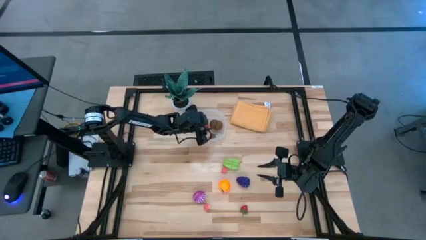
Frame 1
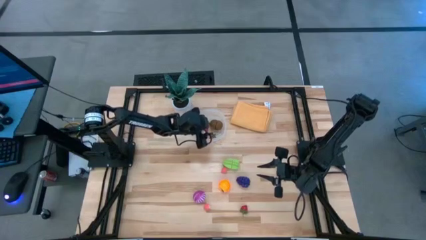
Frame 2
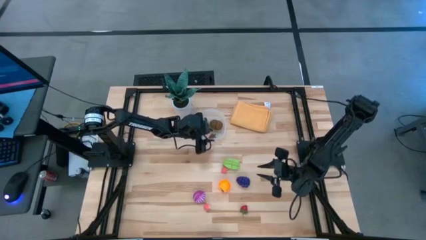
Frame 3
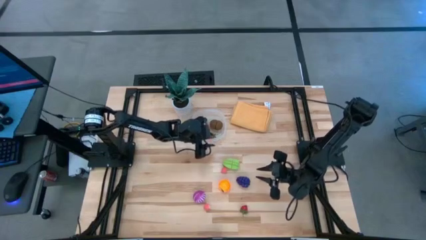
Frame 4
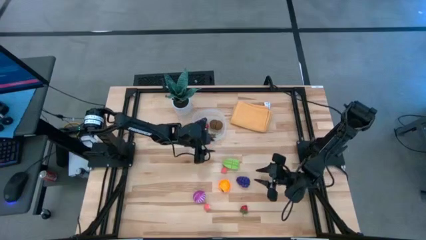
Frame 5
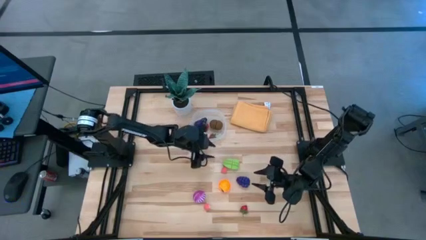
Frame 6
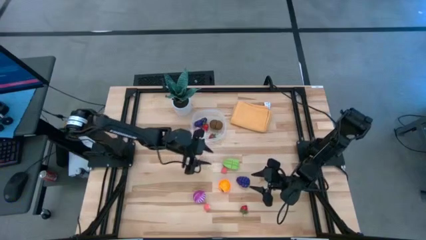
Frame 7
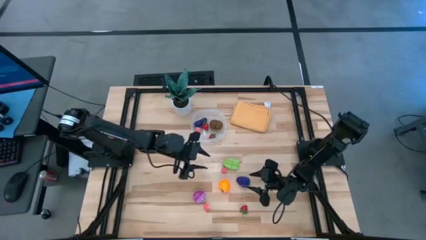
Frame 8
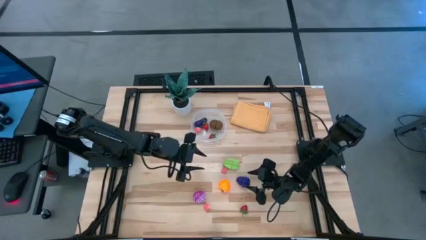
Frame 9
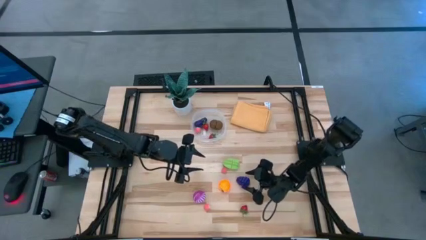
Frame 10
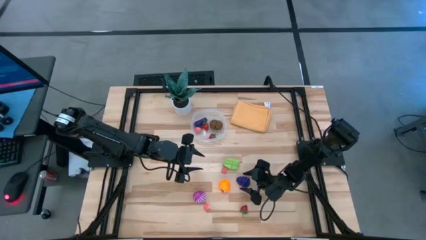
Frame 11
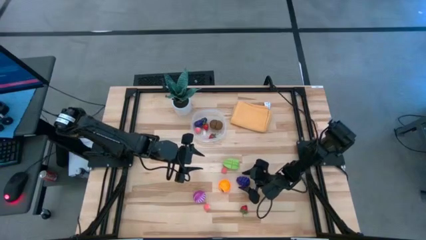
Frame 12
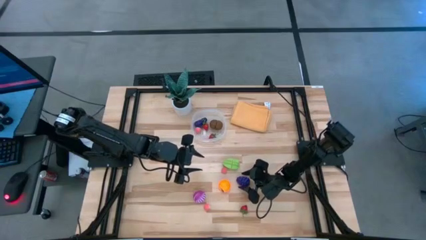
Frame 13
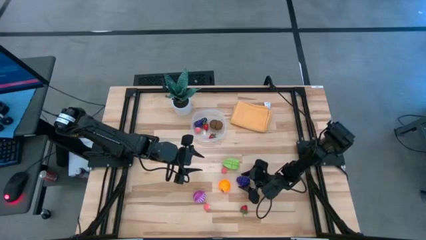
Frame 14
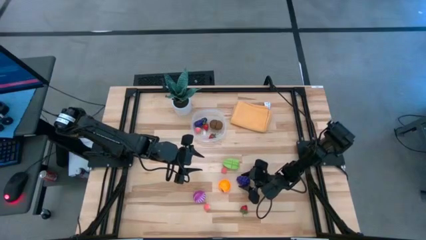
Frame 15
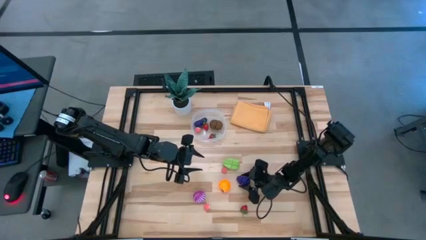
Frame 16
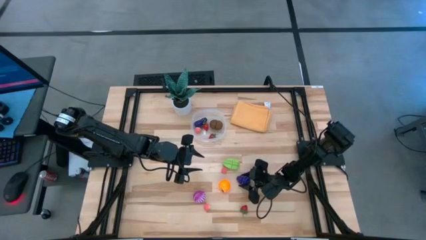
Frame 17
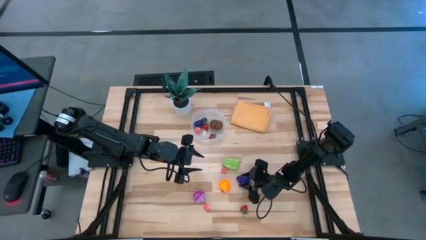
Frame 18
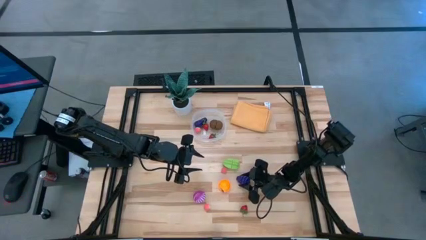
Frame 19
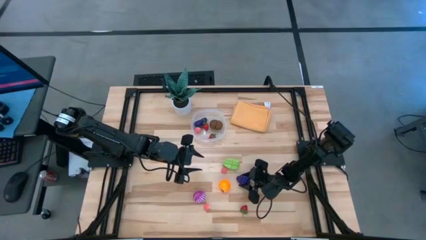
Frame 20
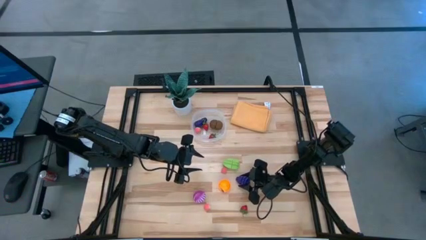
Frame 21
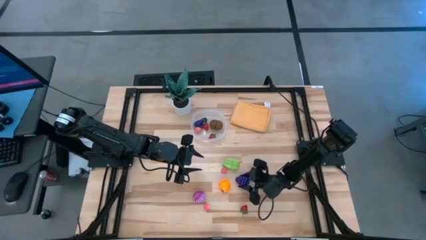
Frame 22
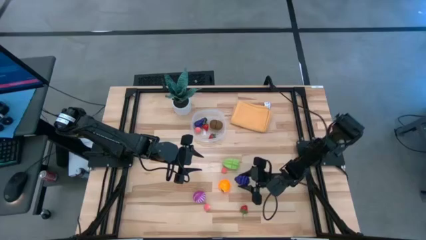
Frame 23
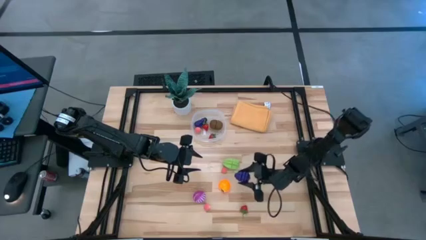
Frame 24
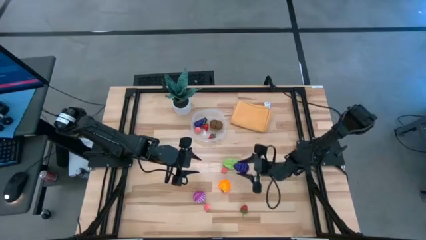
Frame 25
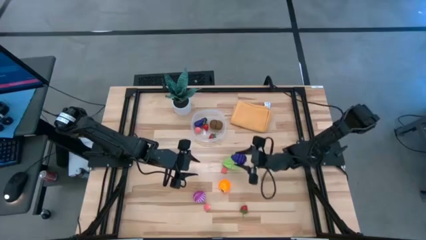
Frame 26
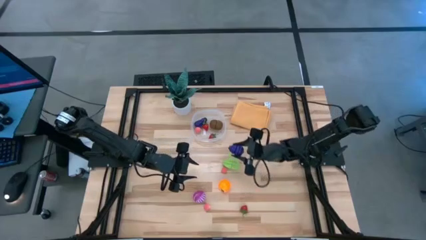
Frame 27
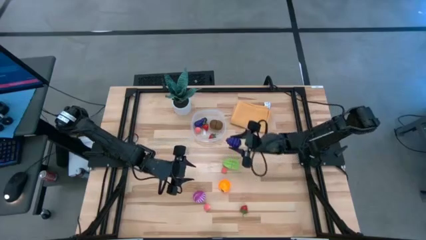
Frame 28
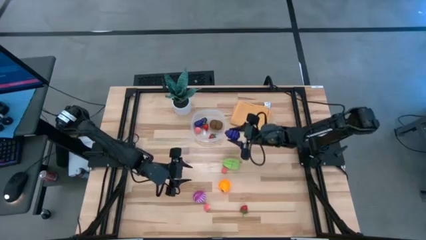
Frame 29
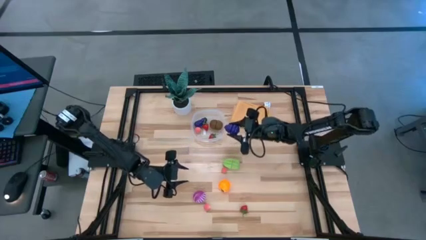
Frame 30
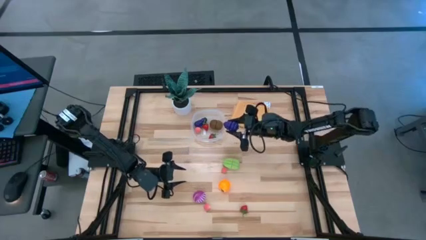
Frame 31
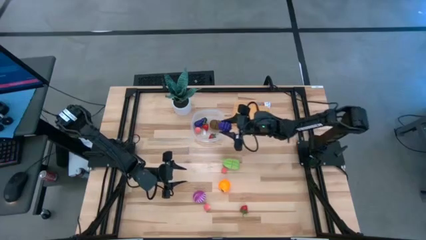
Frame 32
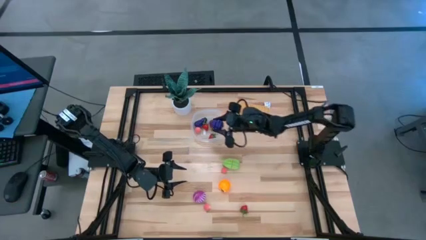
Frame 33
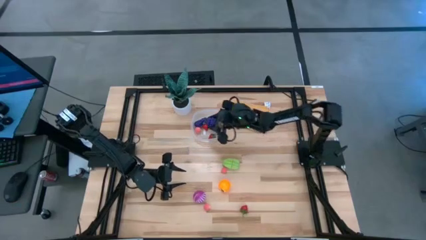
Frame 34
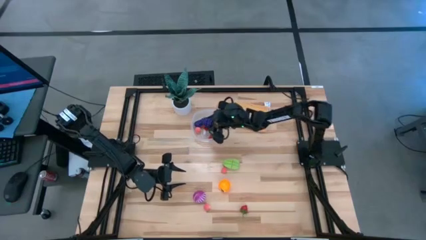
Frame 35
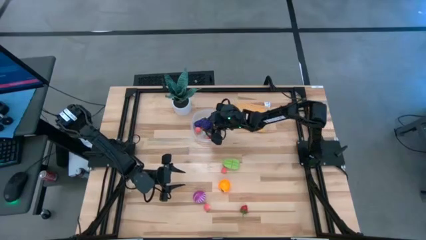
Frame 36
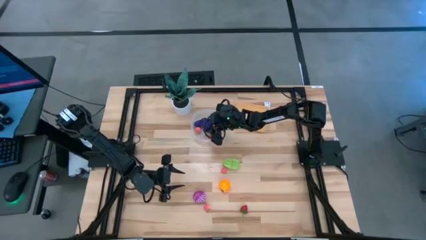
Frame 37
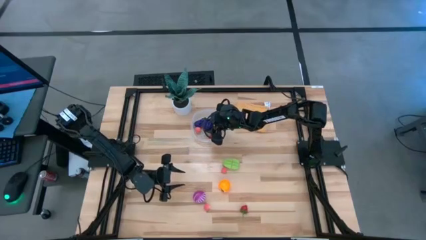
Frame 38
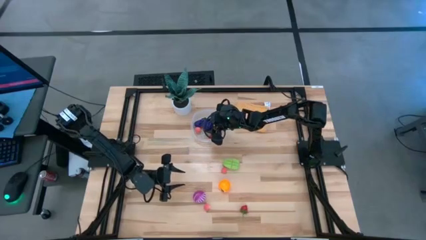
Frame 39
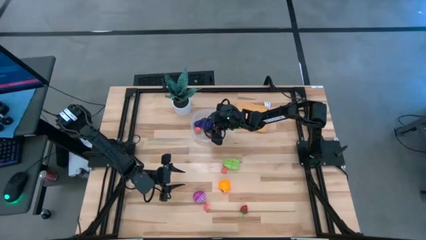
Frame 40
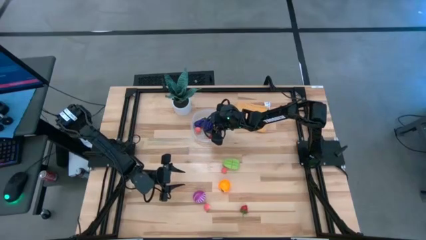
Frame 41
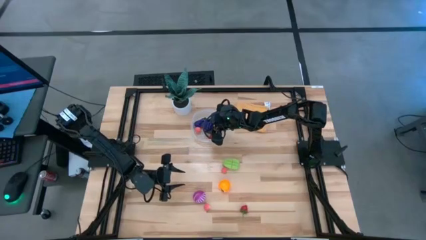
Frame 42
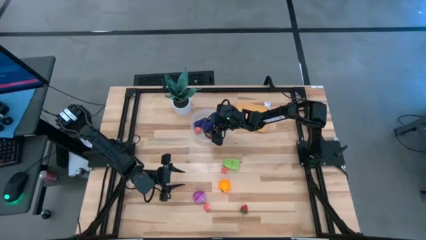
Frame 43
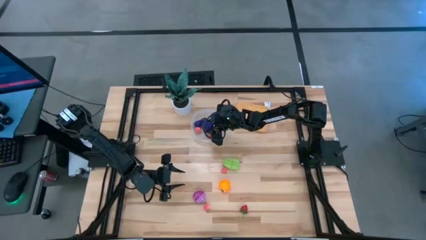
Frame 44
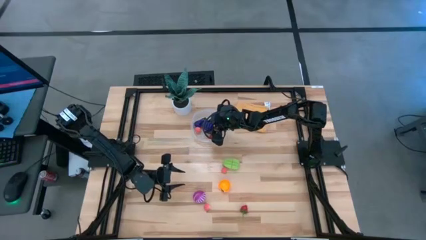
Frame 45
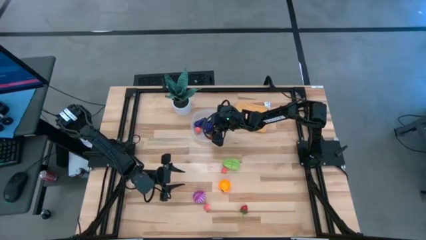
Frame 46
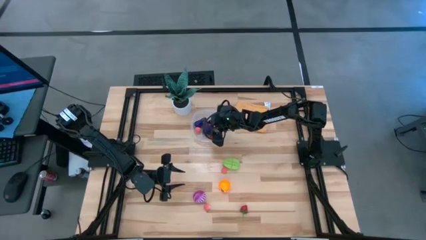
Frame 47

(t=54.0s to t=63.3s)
Task: Pick and placing Produce into tupperware
Put the purple grapes into the transparent bin
